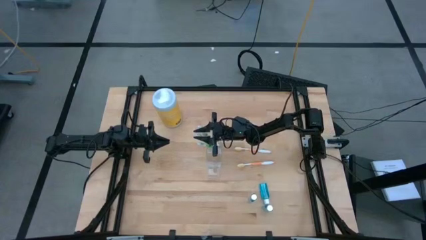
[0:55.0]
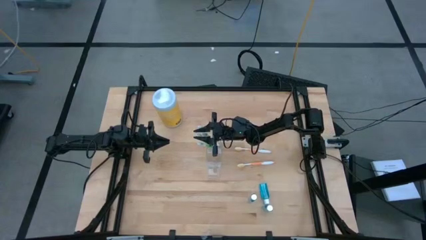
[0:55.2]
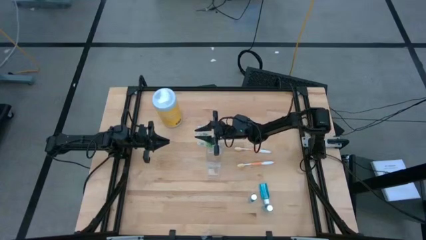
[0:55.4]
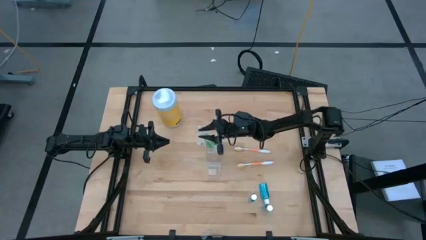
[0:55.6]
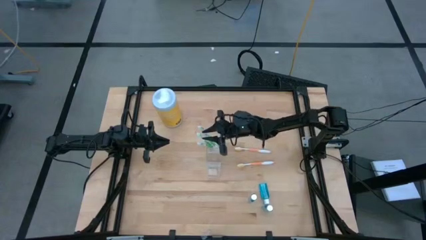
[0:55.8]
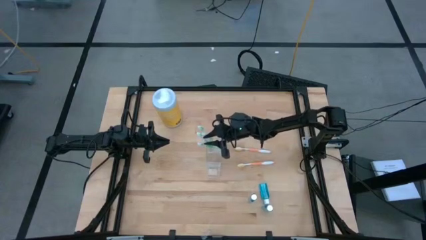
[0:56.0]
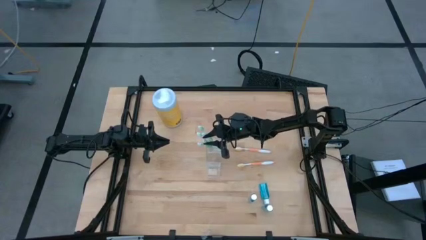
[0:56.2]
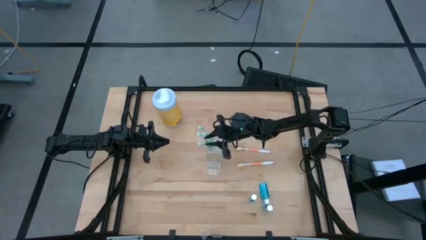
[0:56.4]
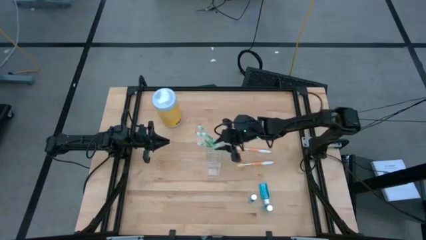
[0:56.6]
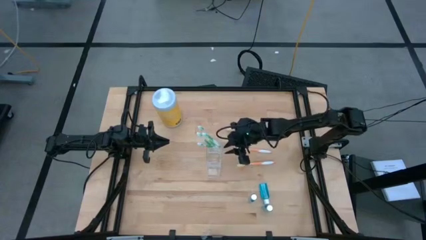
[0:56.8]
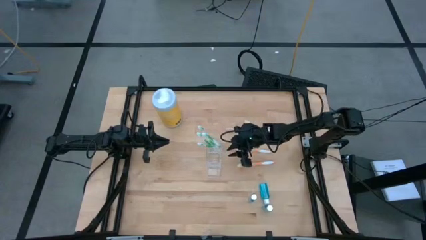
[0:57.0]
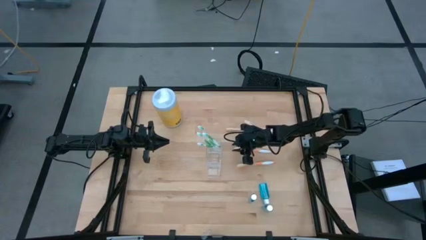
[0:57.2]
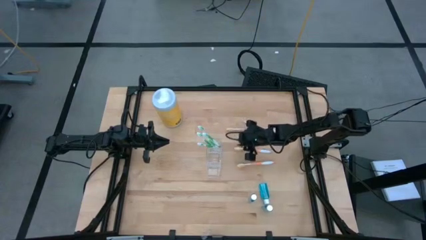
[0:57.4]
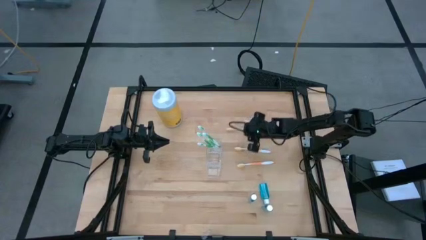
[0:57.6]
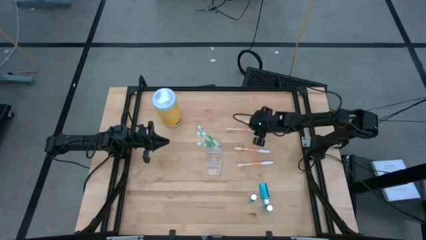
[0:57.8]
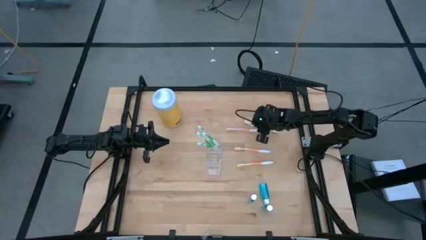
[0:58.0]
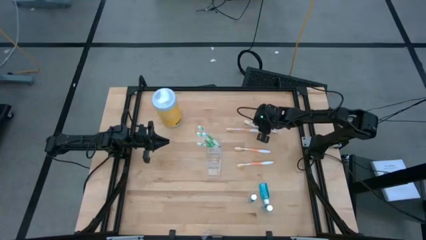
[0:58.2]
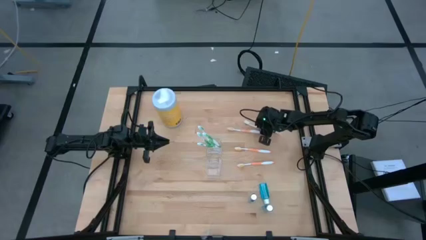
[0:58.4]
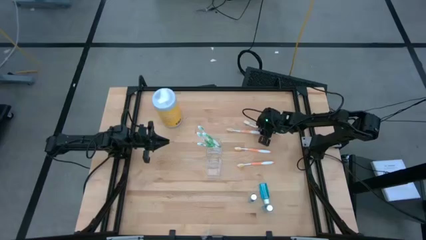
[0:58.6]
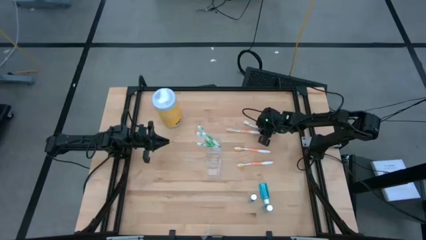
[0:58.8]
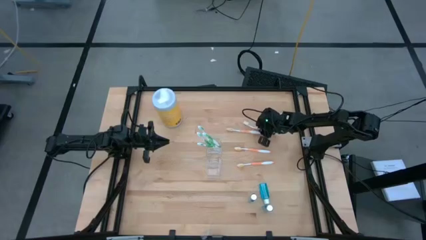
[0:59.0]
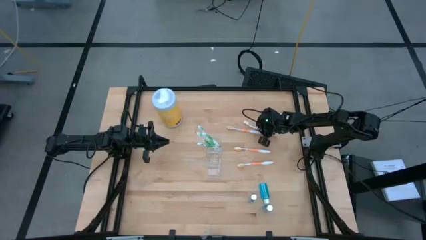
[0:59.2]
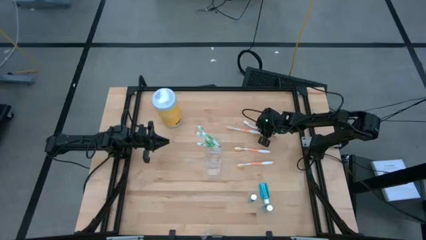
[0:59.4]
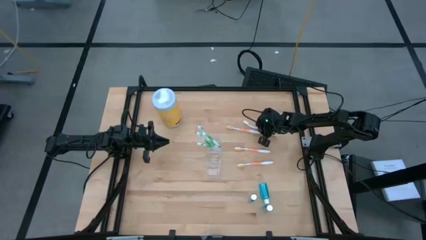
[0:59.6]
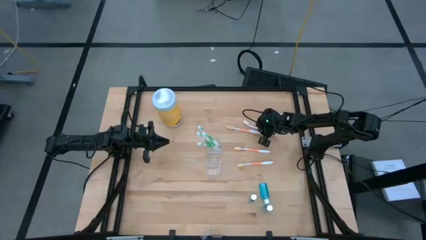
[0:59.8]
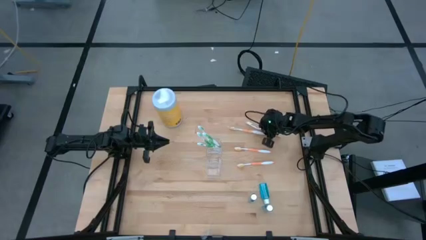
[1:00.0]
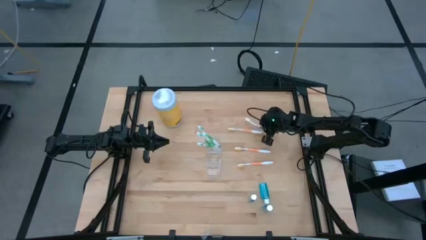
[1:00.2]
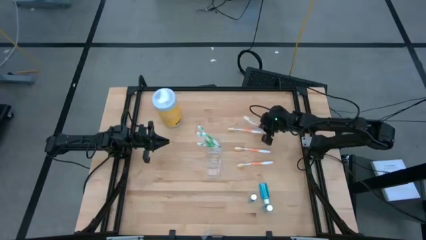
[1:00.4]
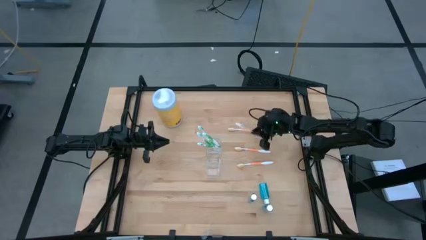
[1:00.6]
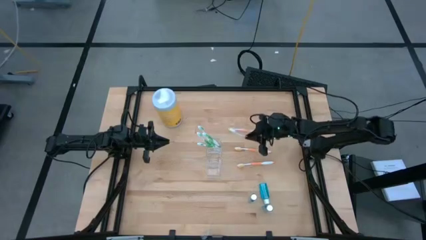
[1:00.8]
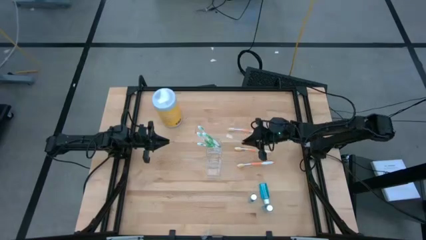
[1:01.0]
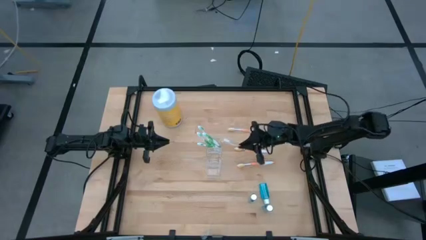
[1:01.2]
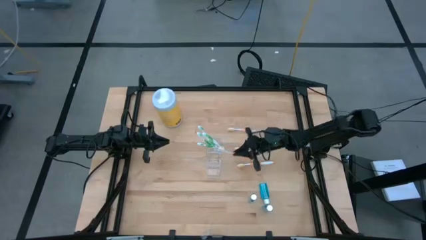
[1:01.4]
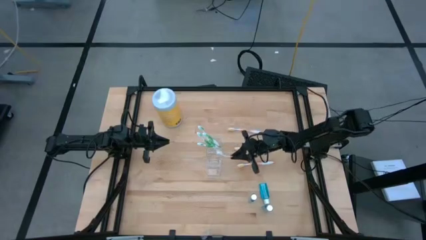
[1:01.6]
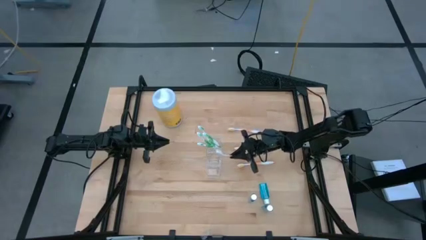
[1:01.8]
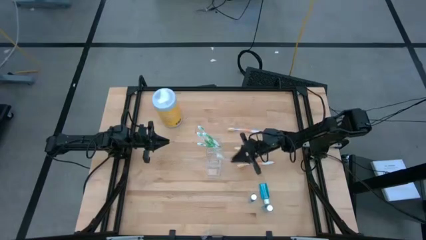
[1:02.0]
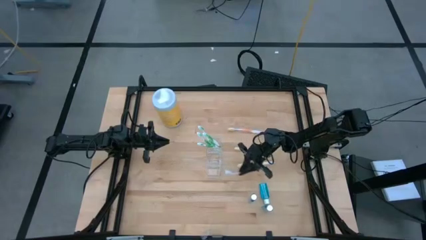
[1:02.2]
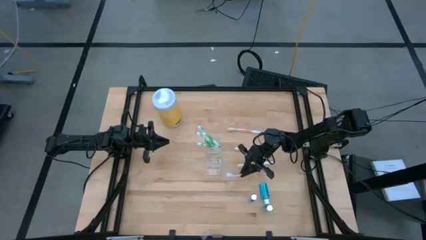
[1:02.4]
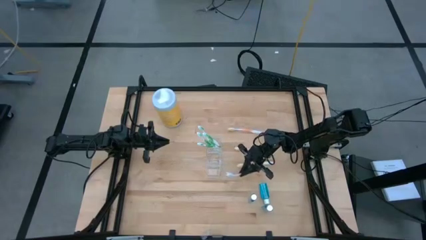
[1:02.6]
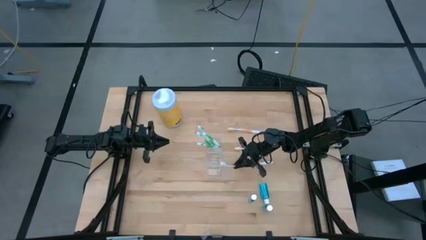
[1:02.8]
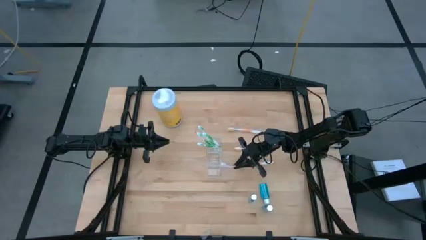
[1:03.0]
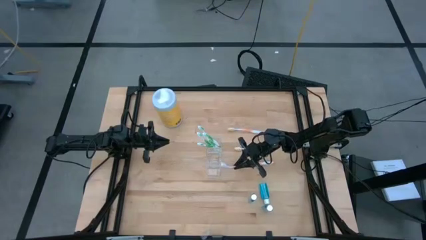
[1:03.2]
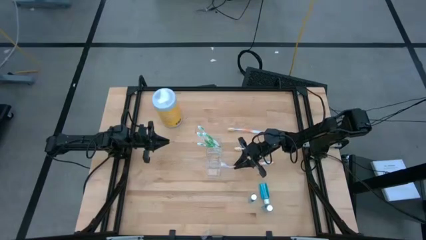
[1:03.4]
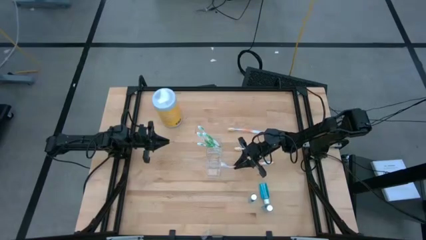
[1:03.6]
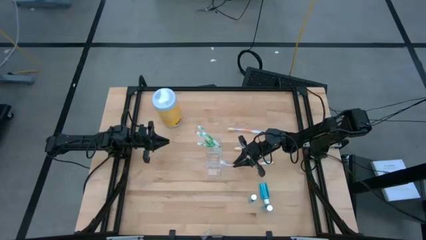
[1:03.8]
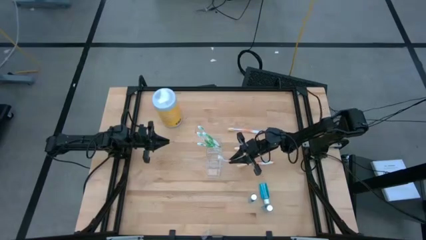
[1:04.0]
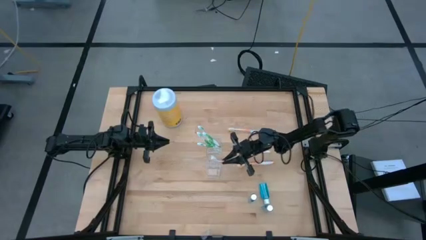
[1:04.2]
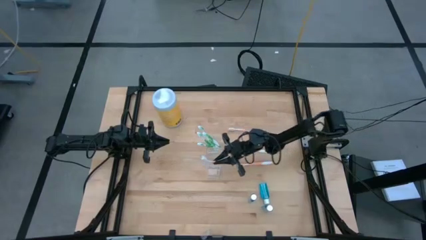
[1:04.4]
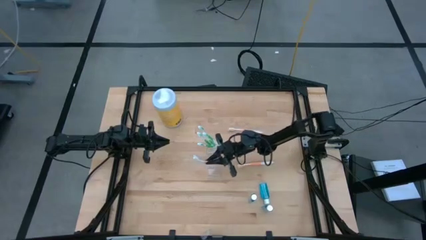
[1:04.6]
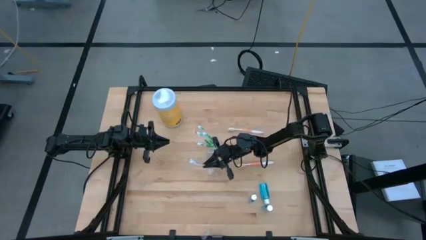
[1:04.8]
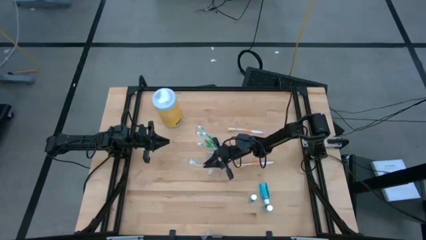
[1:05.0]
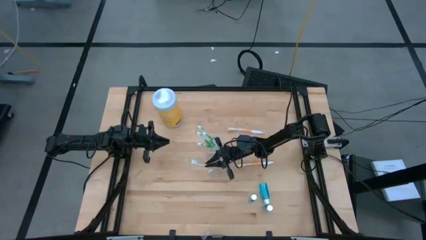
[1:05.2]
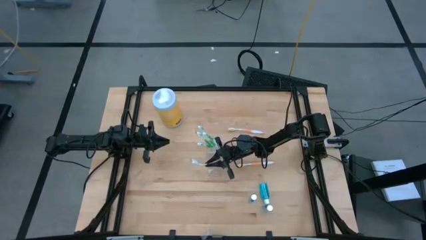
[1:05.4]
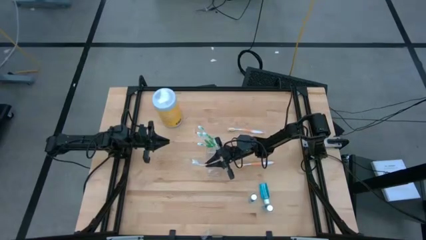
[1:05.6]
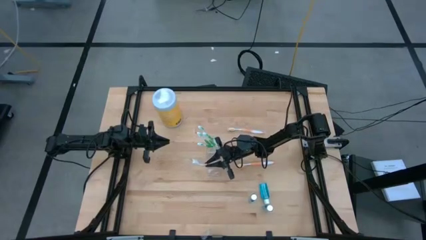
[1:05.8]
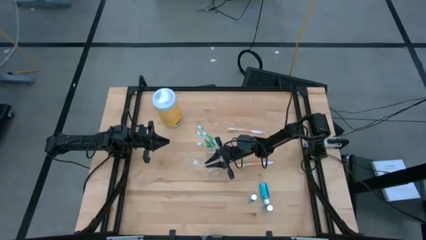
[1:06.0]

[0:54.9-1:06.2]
Task: Pick & Place toothbrushing station
Put the orange toothbrush into the transparent organizer
